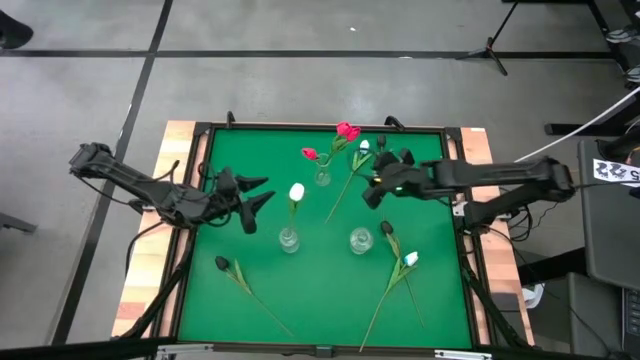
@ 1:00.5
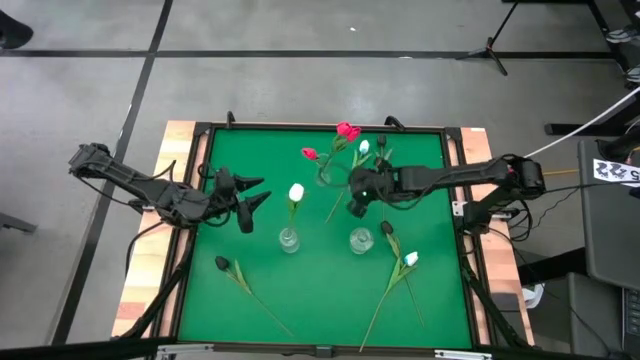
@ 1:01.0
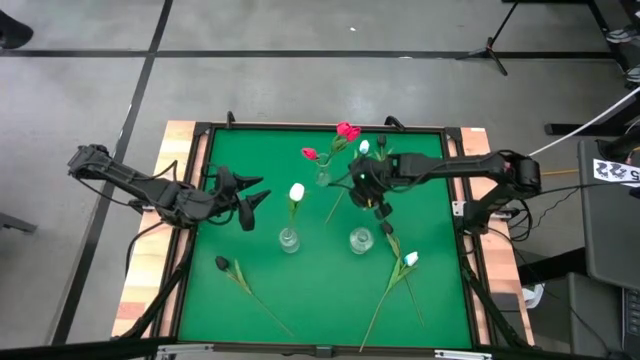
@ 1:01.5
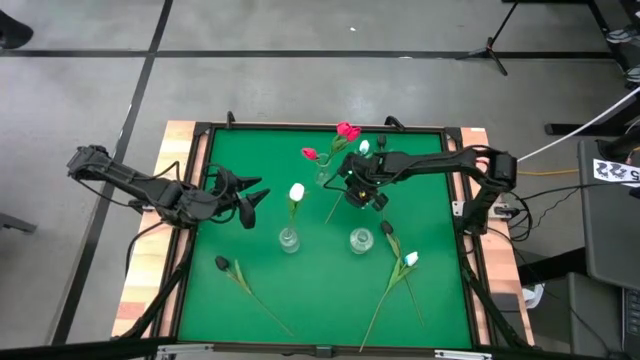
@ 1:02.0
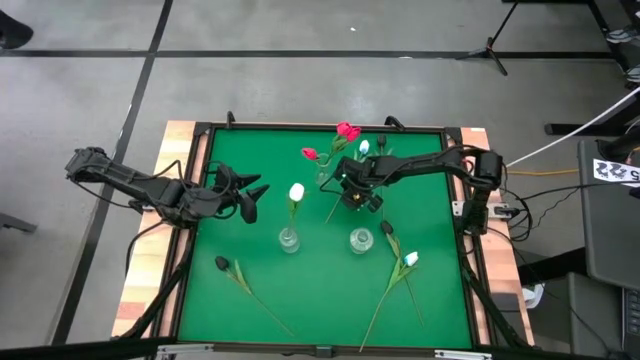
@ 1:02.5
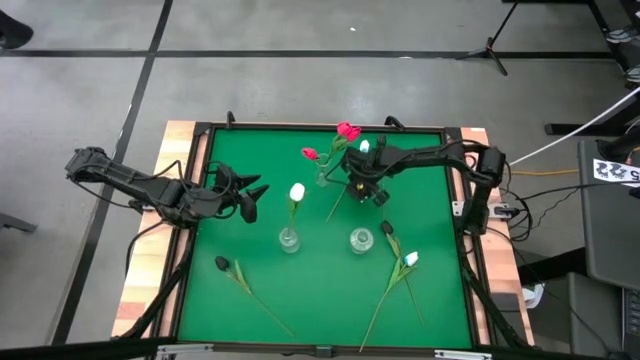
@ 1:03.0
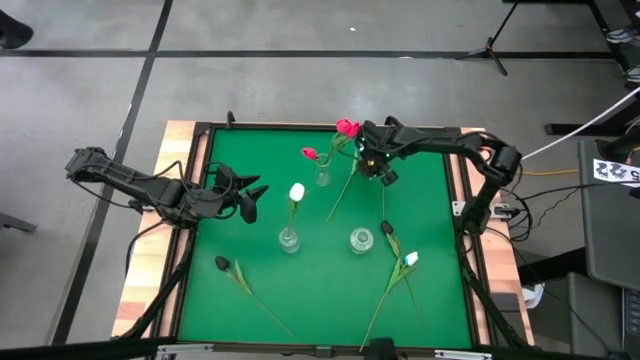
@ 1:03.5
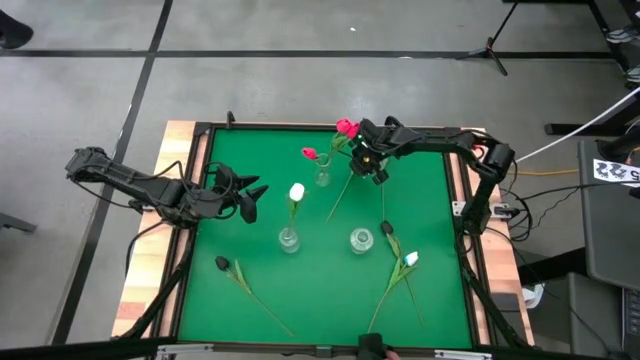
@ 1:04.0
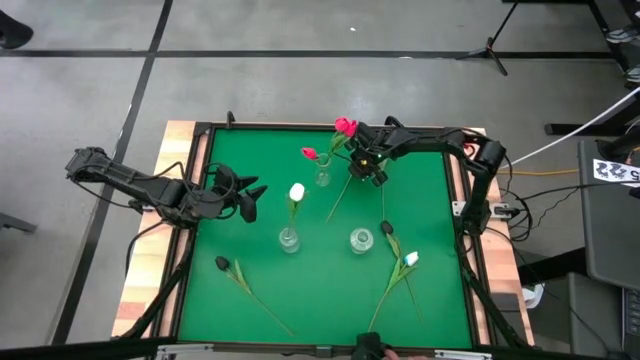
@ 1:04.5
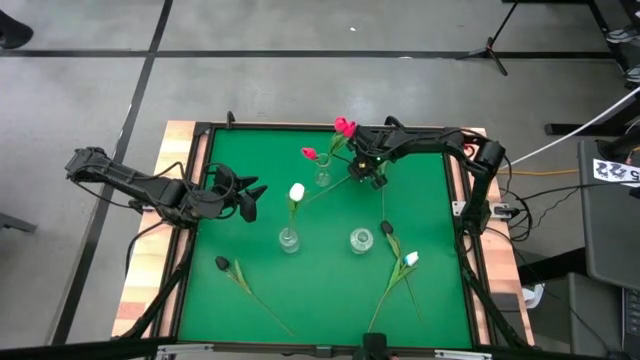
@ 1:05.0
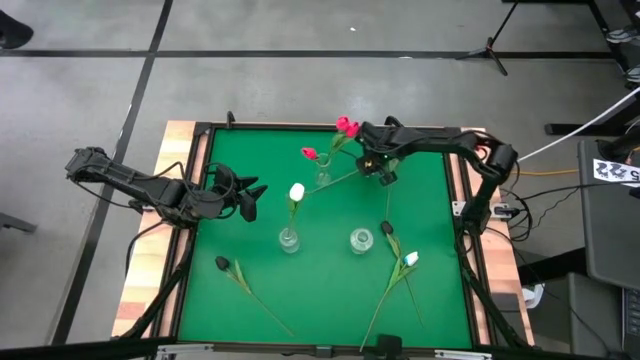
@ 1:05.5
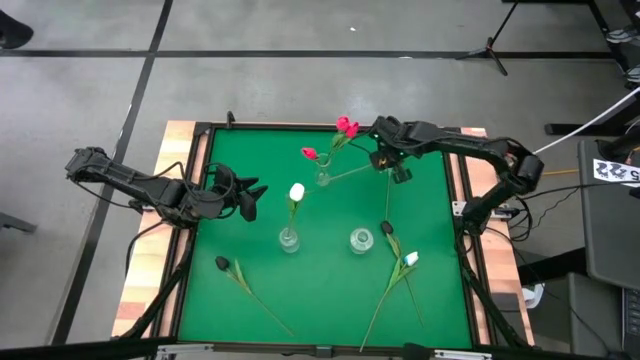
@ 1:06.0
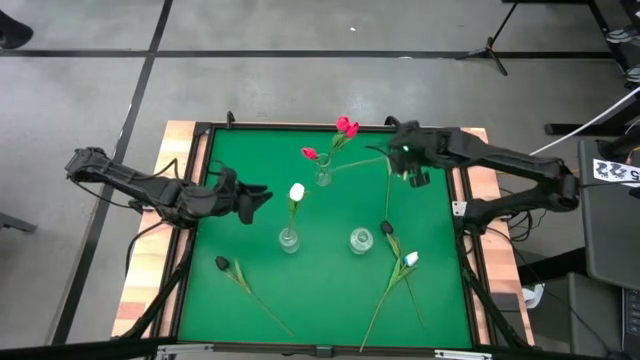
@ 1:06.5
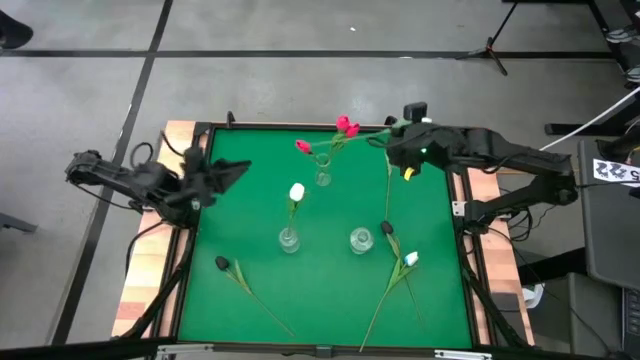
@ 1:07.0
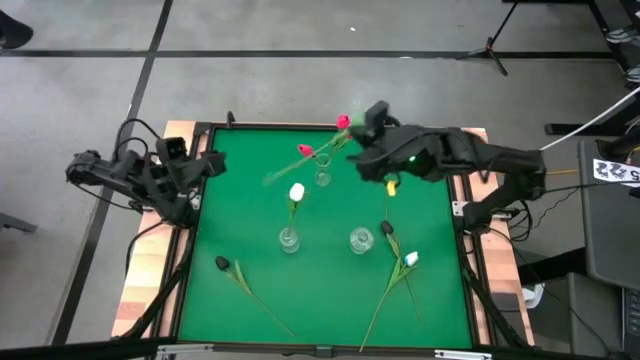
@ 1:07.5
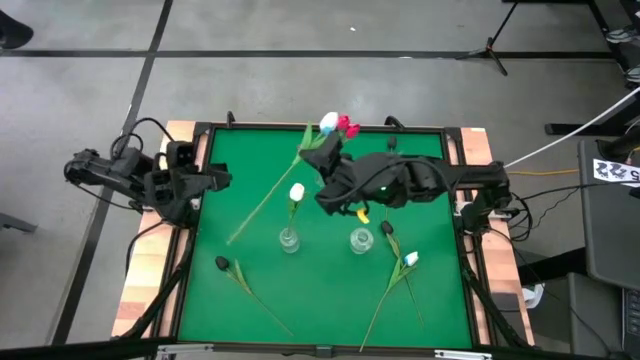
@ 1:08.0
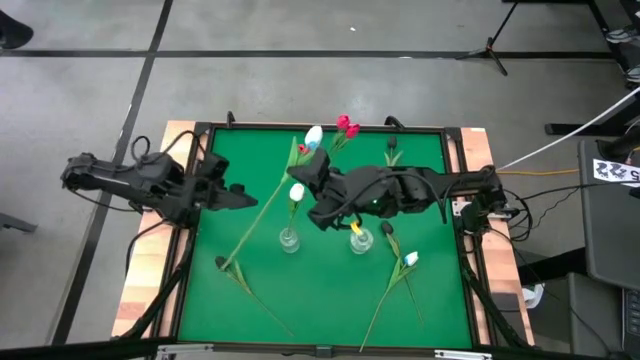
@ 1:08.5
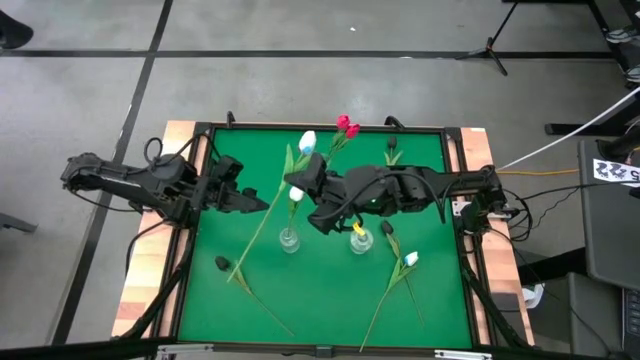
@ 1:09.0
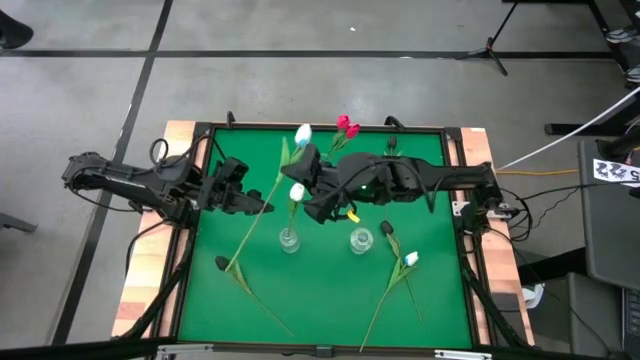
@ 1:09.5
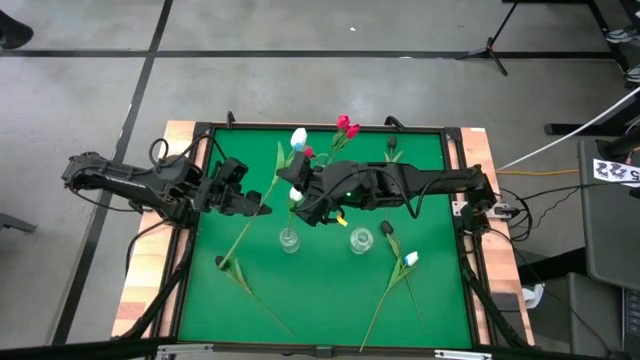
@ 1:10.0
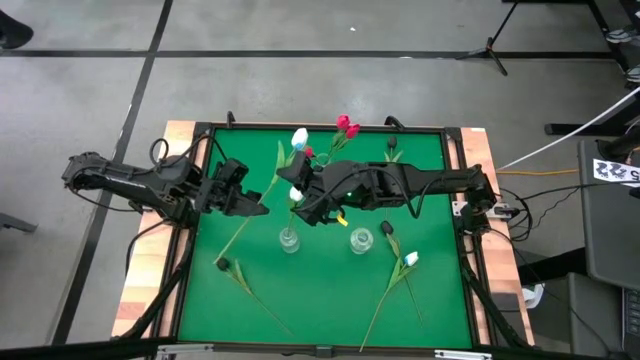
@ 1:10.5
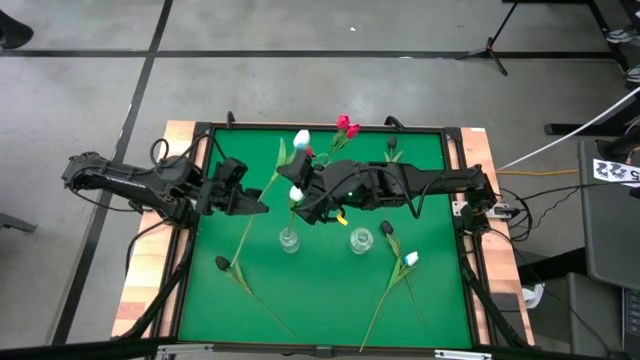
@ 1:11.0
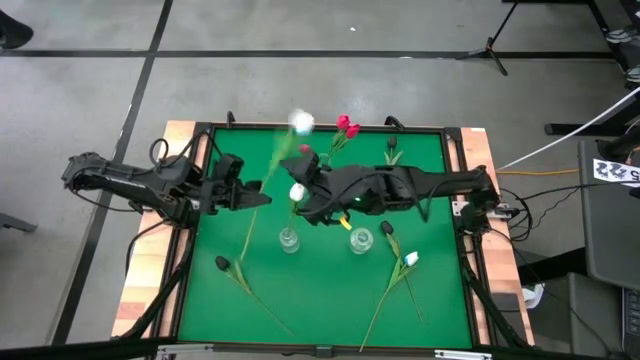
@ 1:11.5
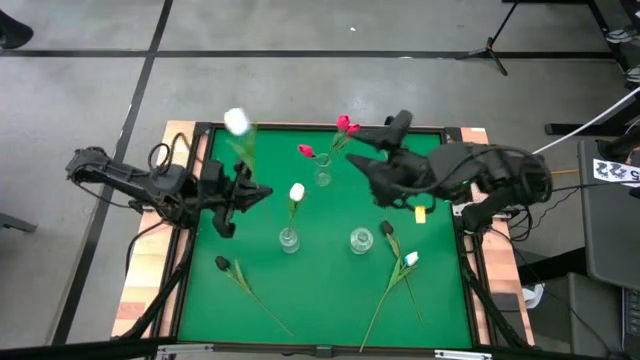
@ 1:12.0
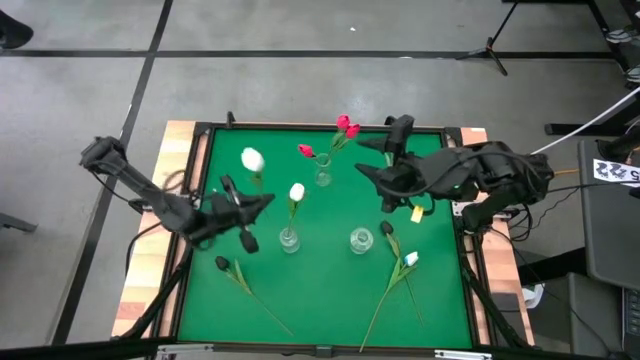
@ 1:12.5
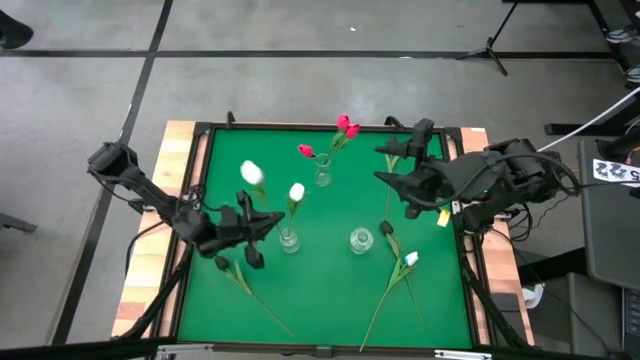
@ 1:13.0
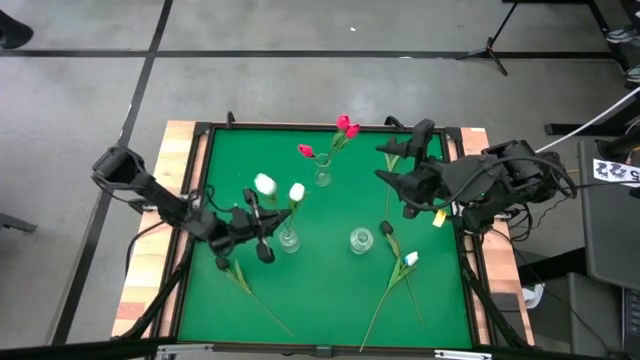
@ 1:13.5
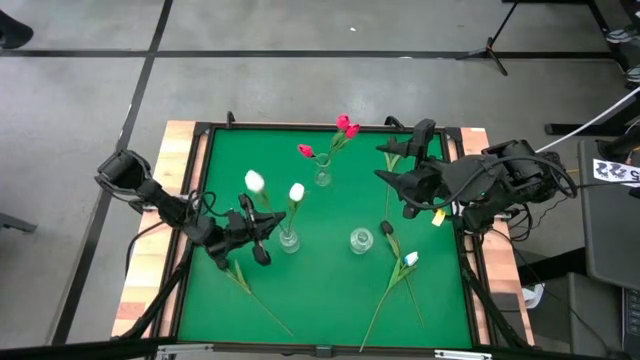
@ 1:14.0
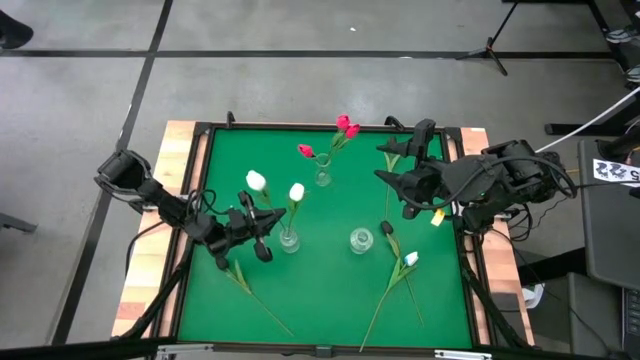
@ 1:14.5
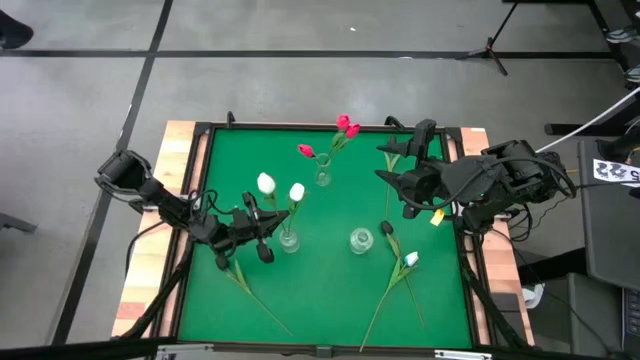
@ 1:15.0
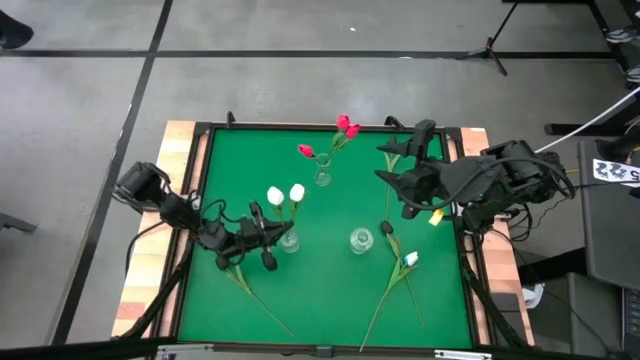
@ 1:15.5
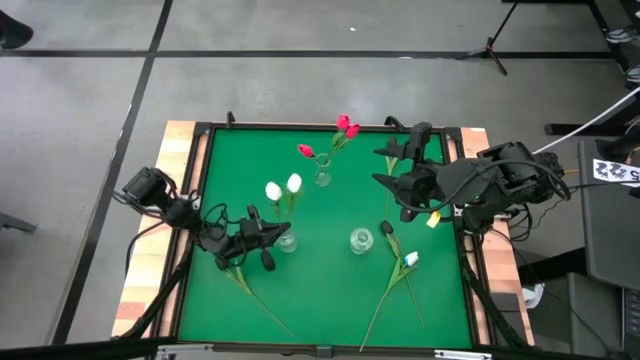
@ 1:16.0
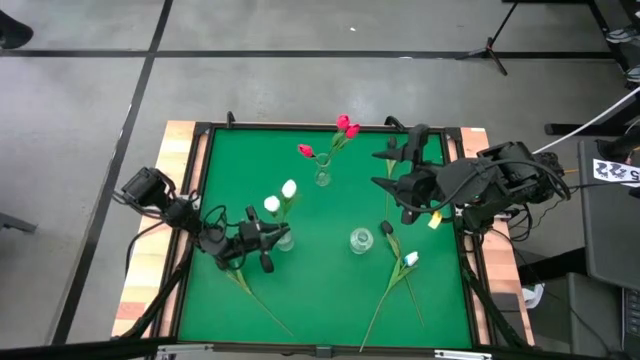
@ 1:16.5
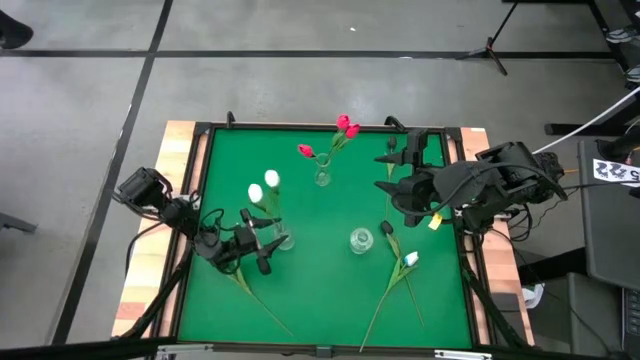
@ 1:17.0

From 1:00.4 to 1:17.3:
Task: Sort flowers into vase by color
Put the top white tulip into the bottom left transparent vase

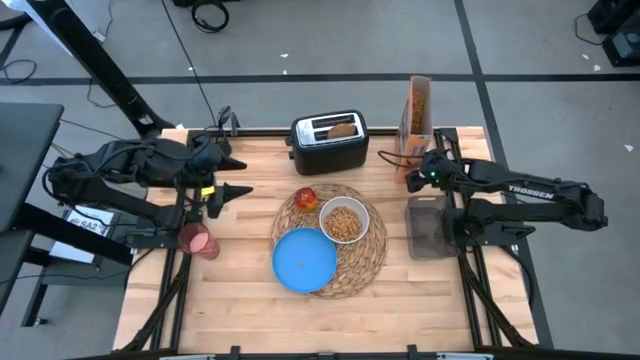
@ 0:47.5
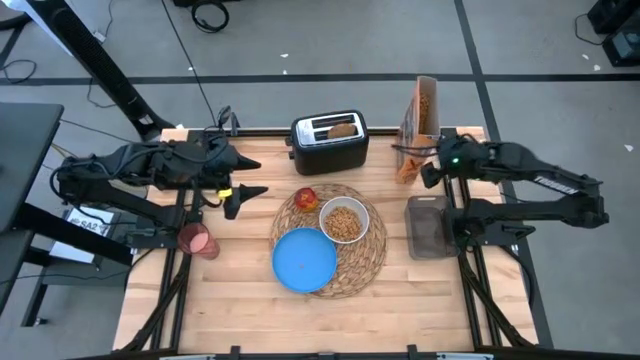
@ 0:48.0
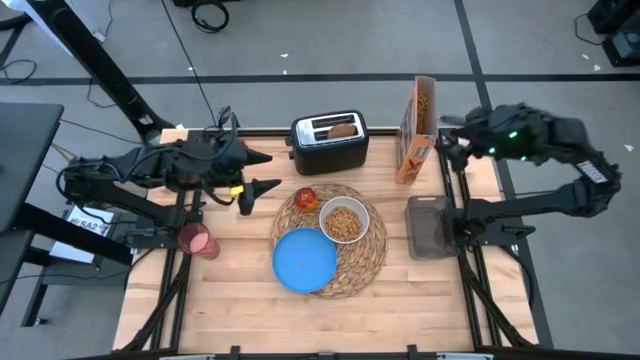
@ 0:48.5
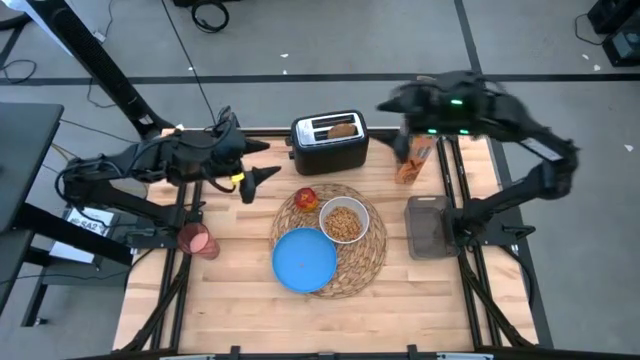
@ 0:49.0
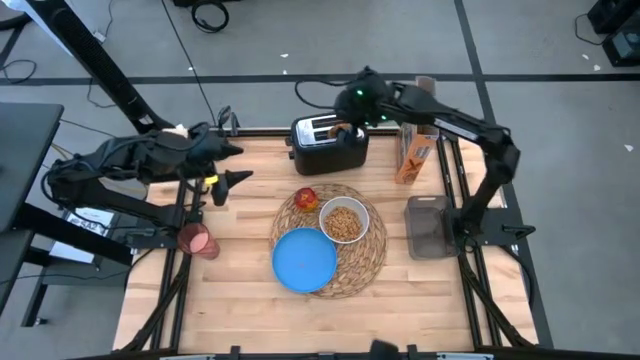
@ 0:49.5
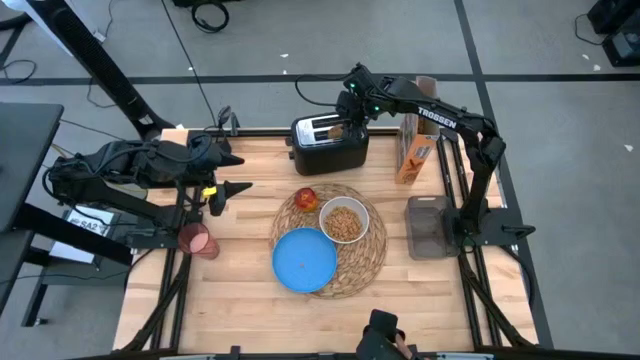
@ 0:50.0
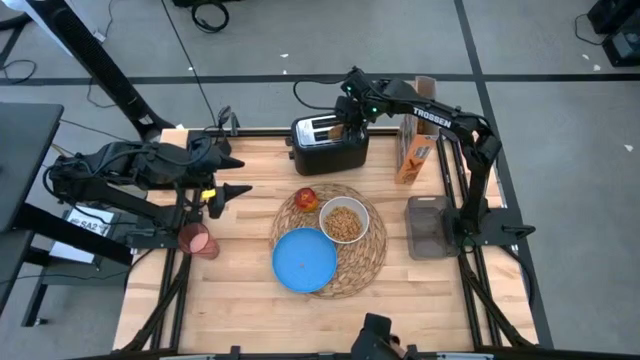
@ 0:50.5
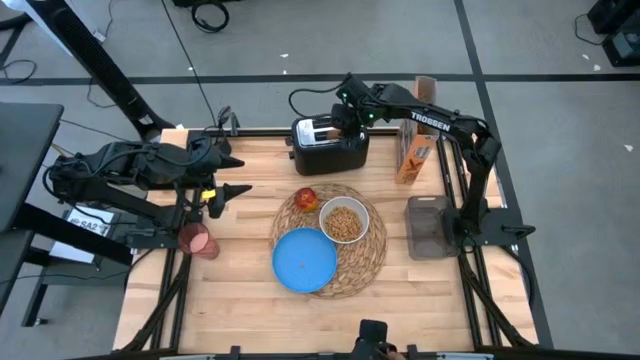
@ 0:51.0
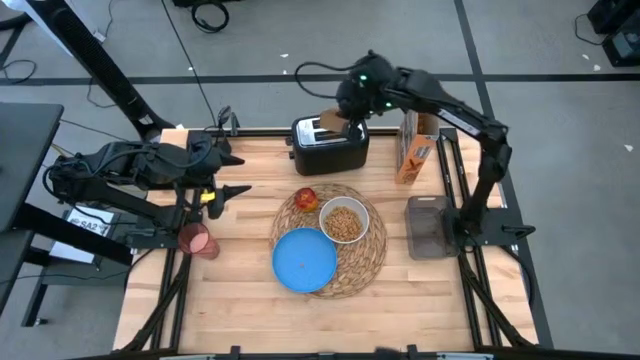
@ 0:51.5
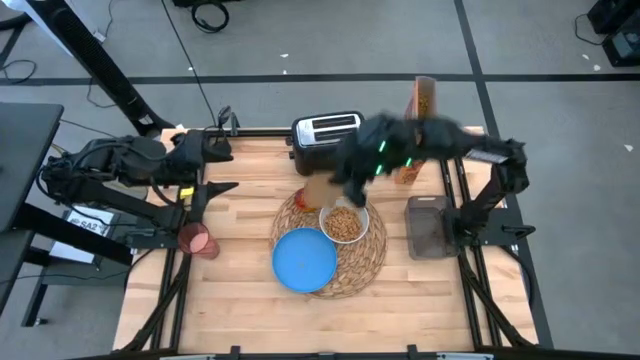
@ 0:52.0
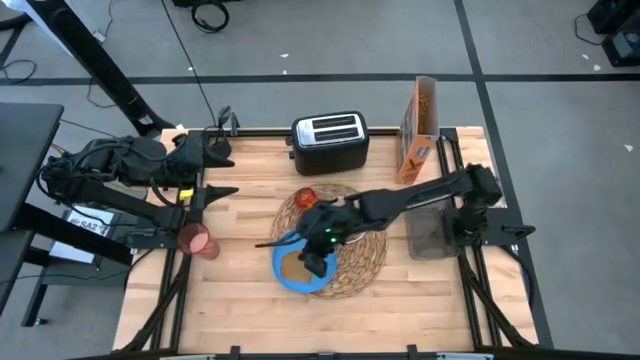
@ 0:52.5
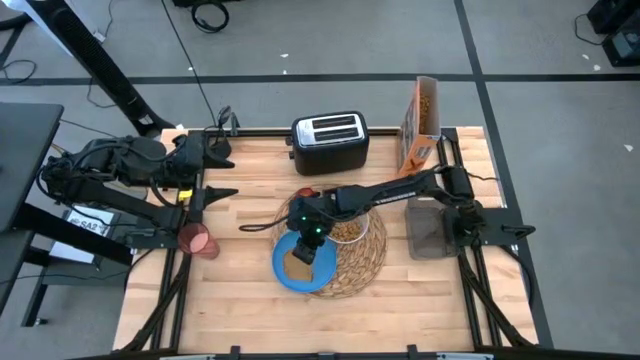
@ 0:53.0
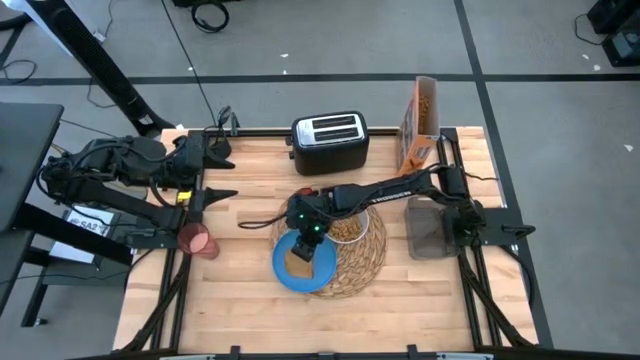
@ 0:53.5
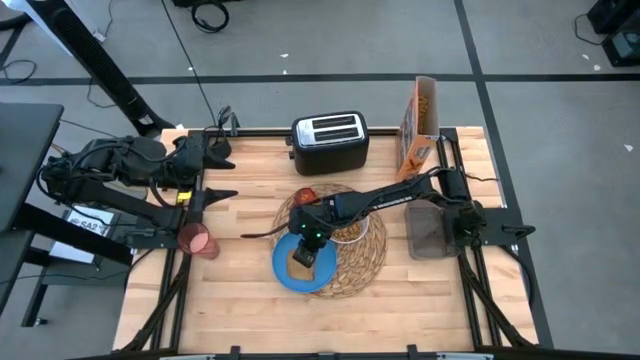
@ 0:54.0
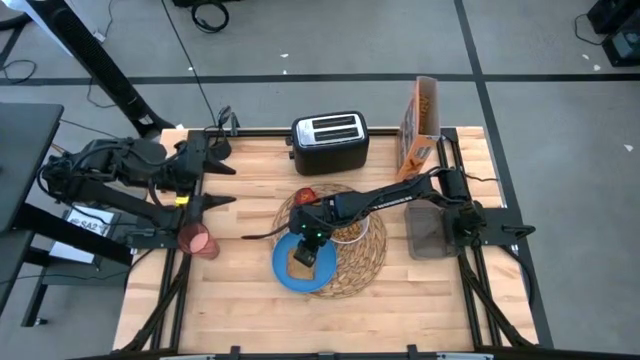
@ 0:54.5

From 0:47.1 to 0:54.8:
Task: Arrange a breakfast setting
Put the toasted bread on top of the blue plate
